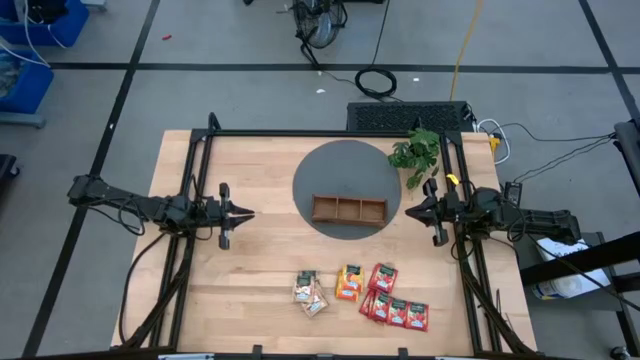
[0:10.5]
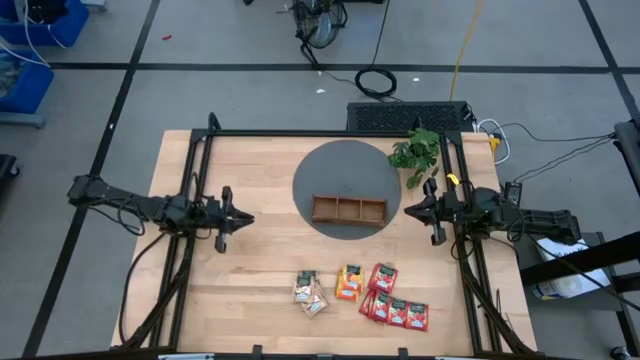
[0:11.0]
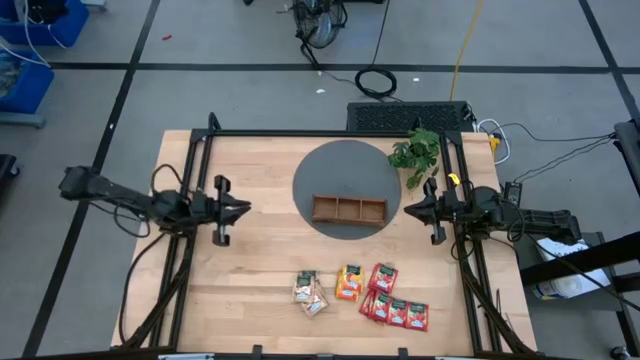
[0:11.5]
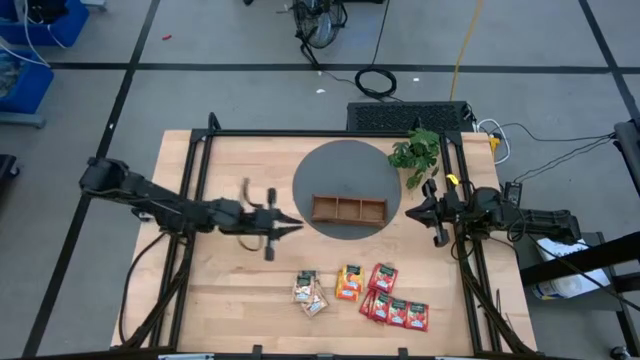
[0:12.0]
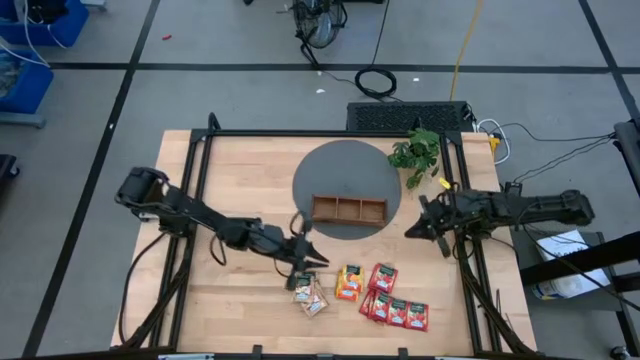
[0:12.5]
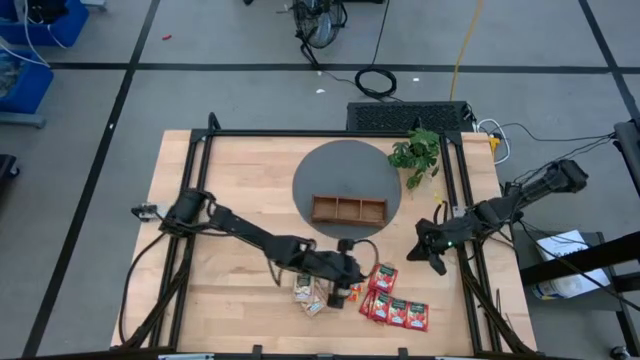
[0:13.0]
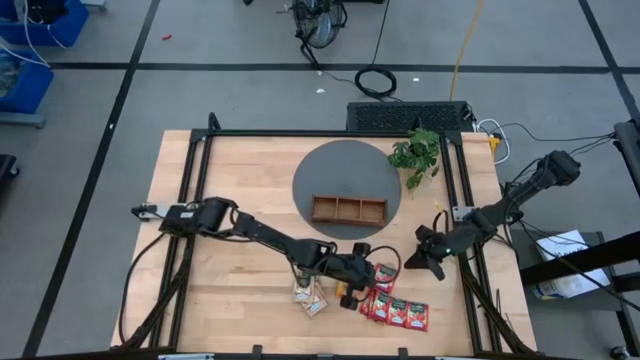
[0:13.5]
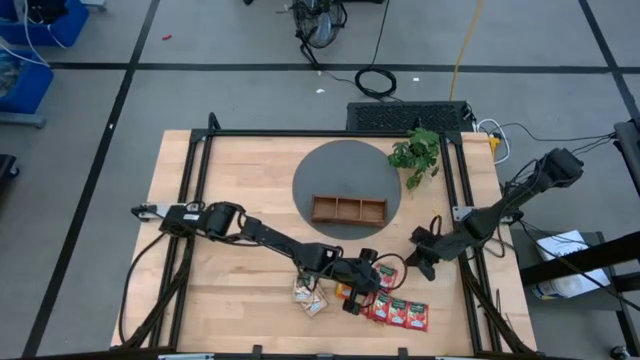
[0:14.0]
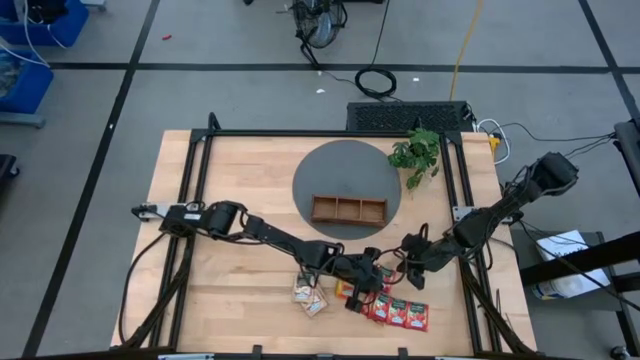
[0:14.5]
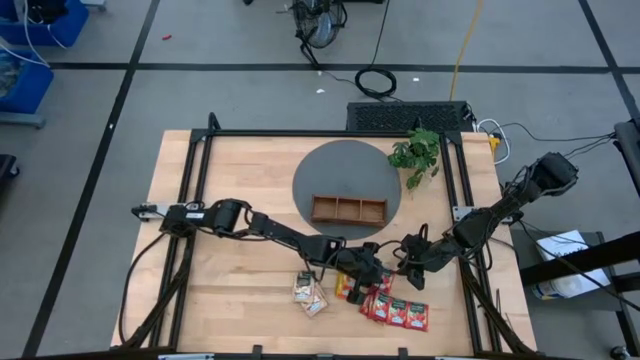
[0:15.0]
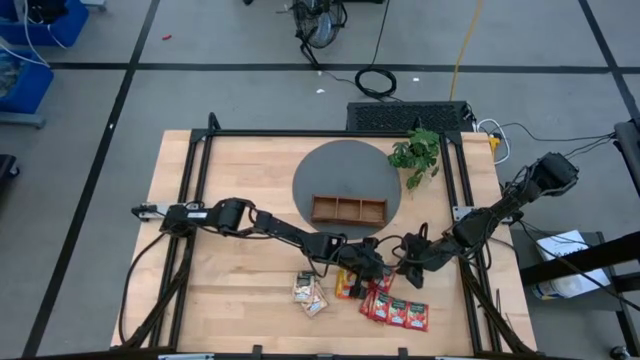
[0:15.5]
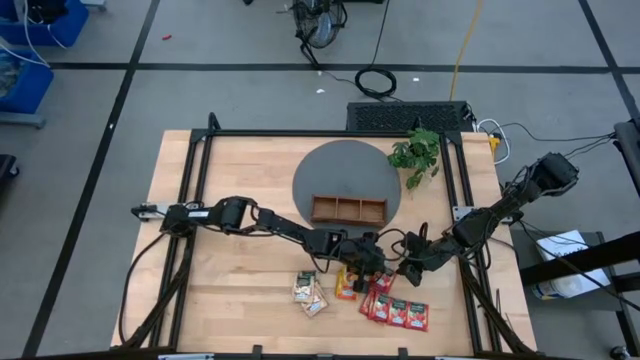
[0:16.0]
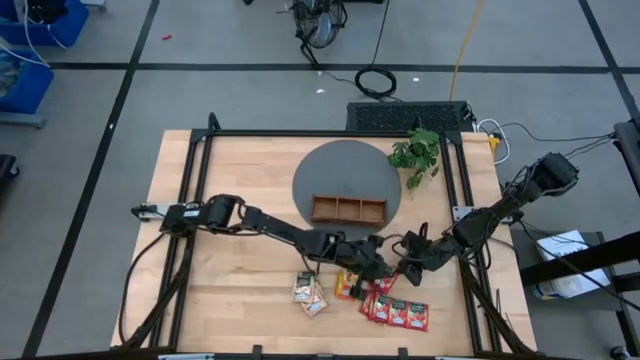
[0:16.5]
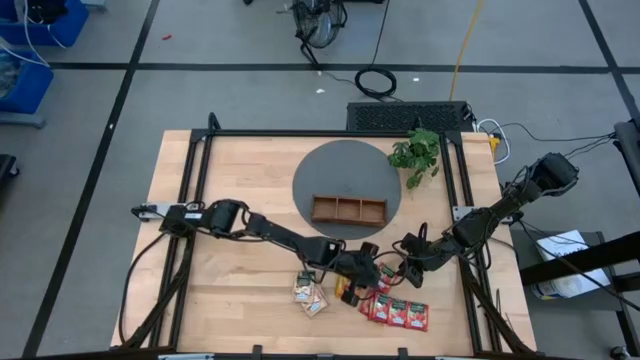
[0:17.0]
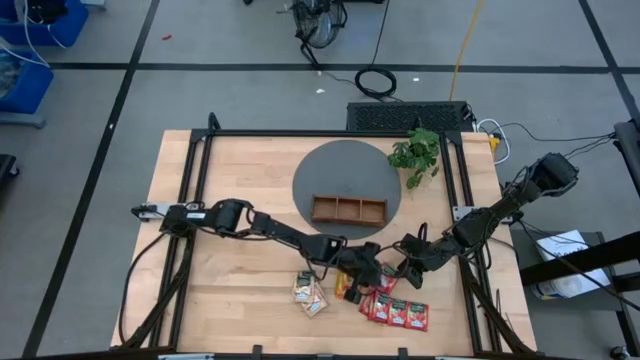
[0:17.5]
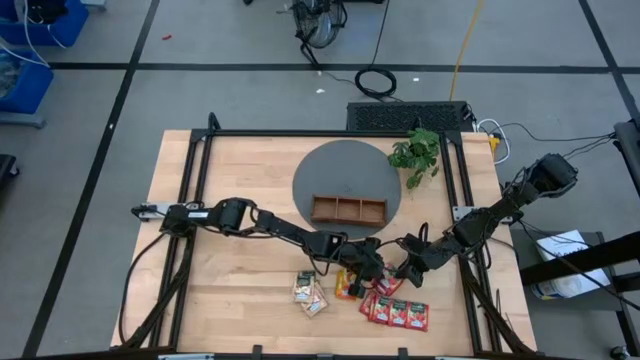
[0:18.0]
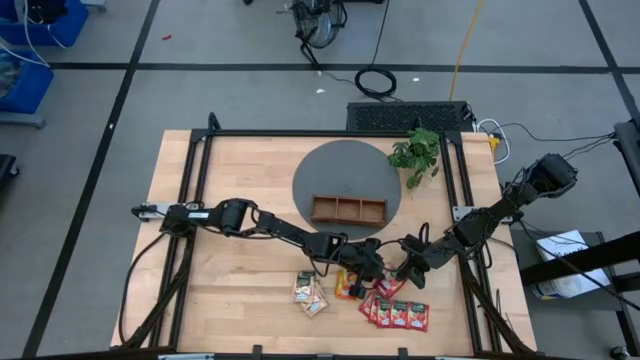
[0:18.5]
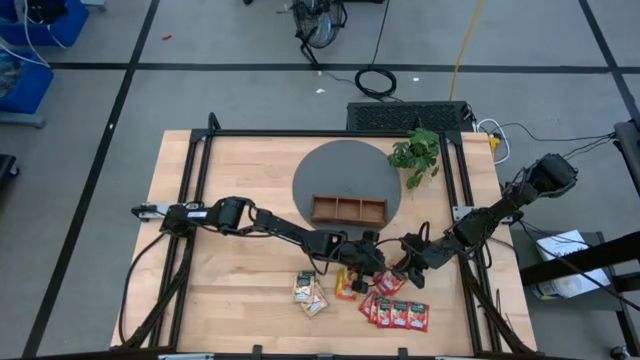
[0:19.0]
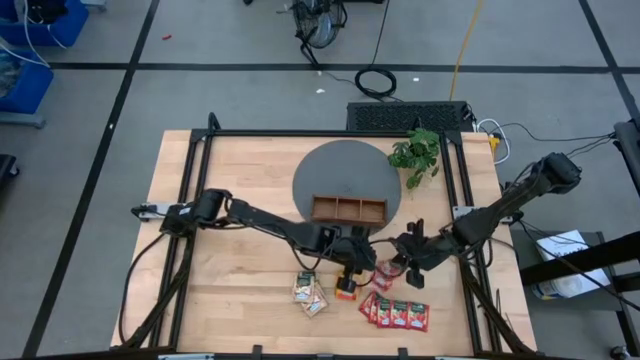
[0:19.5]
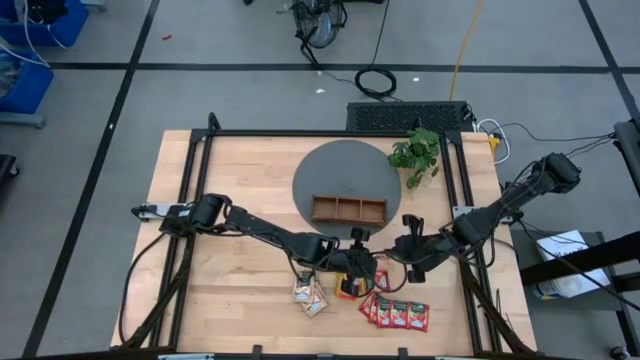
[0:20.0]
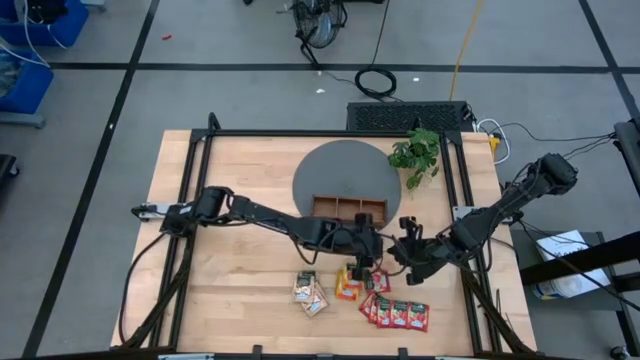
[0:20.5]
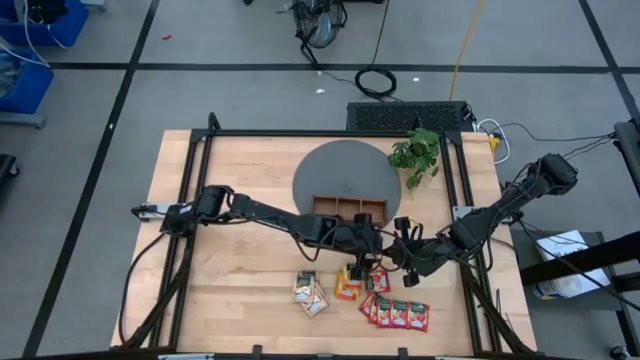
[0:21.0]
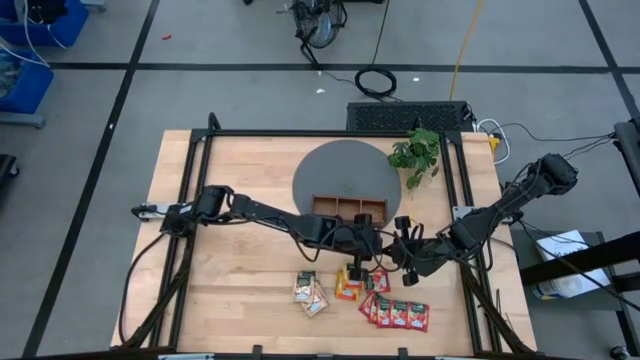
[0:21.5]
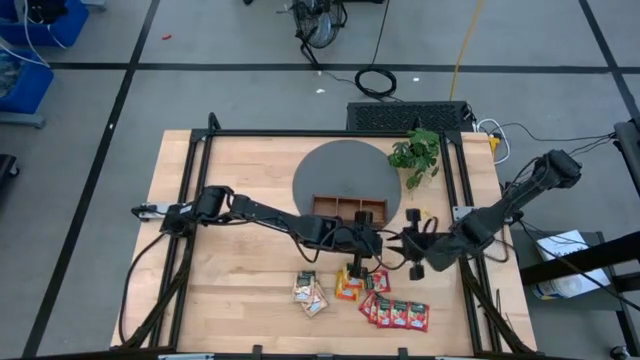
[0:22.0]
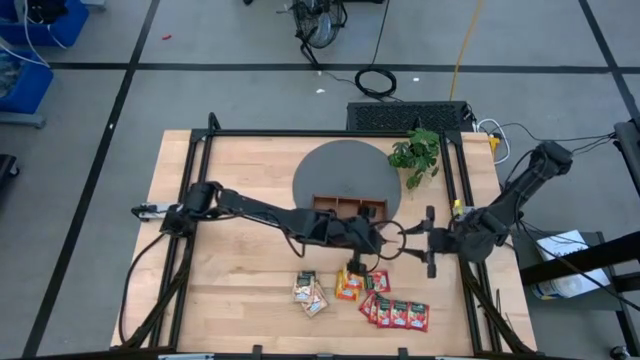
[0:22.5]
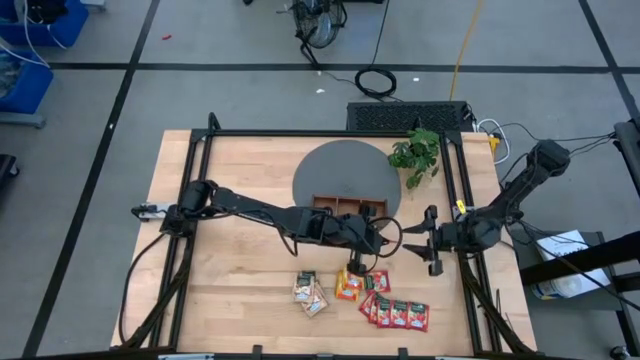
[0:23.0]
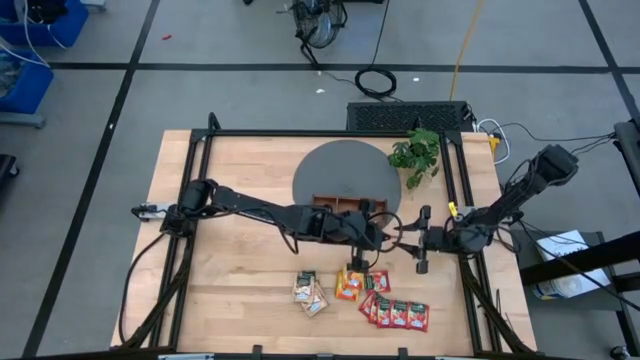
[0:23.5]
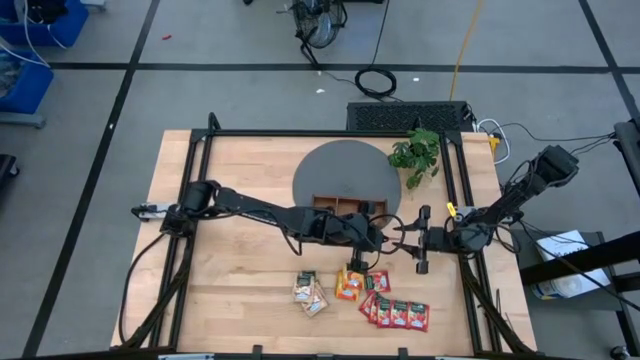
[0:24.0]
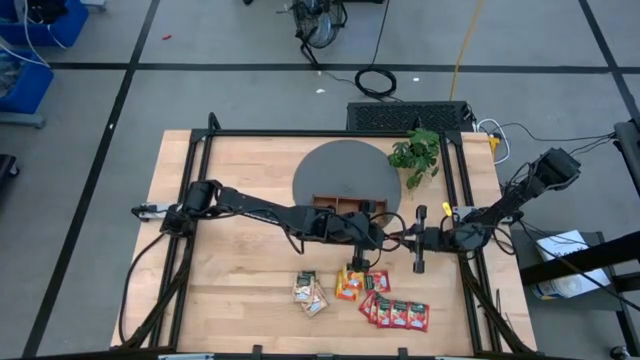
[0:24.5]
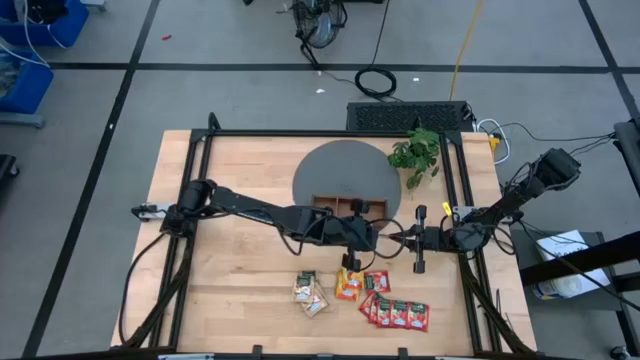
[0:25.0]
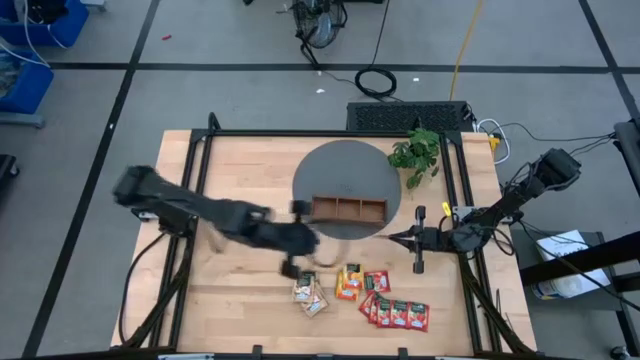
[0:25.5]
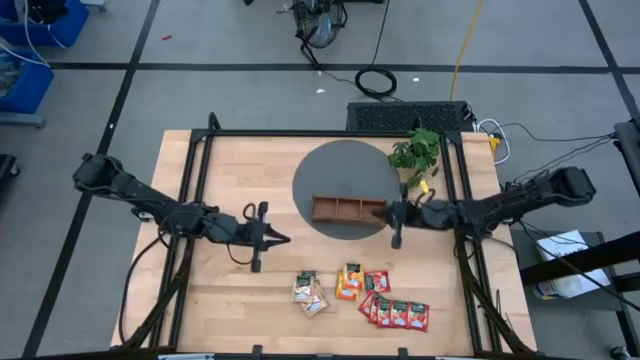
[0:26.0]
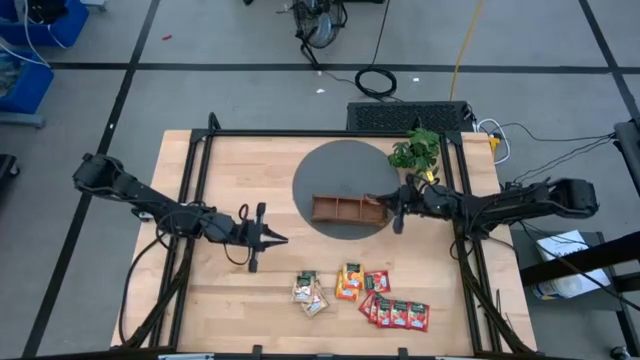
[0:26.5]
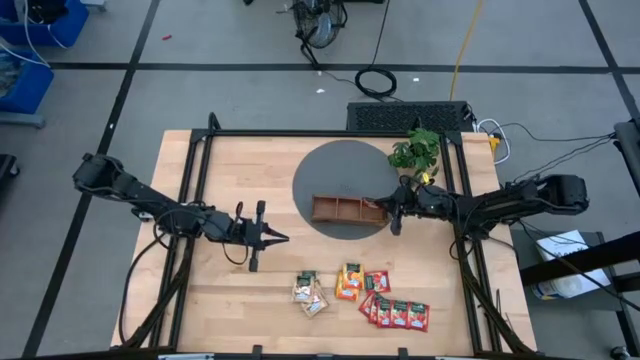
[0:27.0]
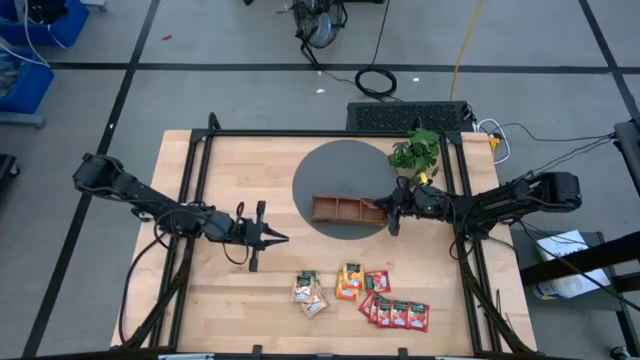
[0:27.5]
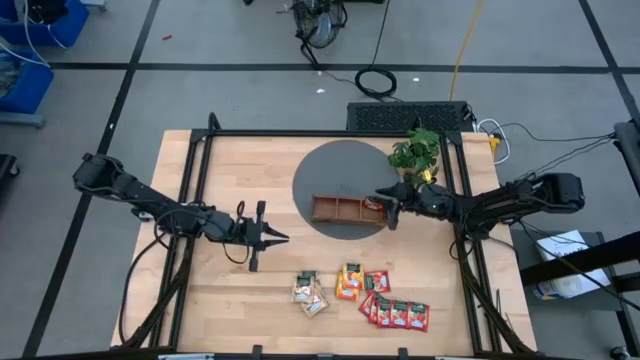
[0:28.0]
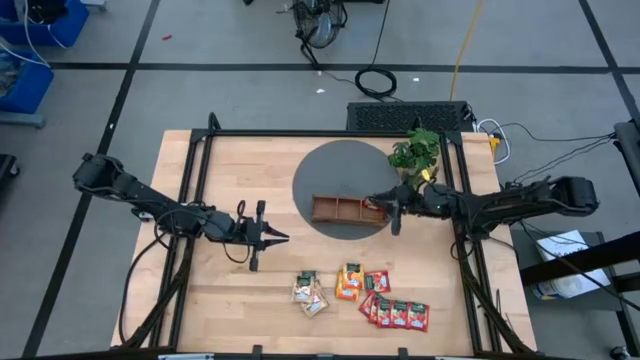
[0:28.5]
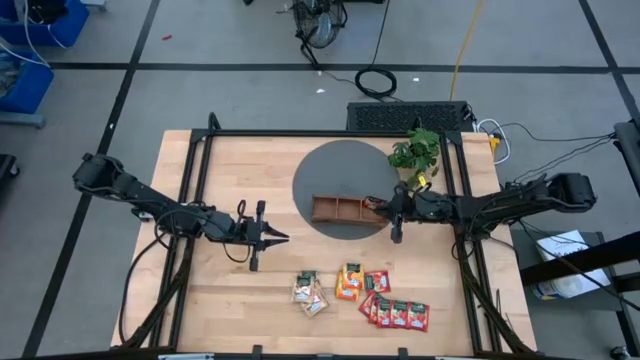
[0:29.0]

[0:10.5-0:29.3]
Task: Pick & Place Tea
Put the red tea bag into the left section of the wooden organiser

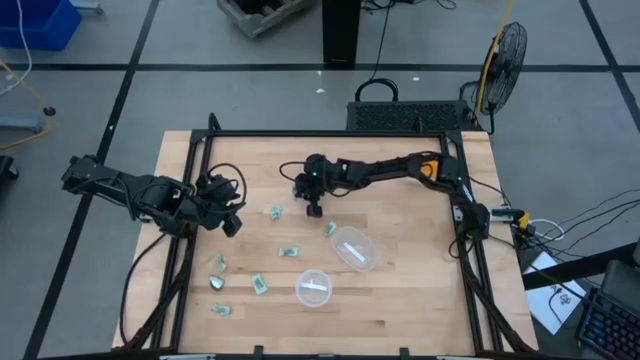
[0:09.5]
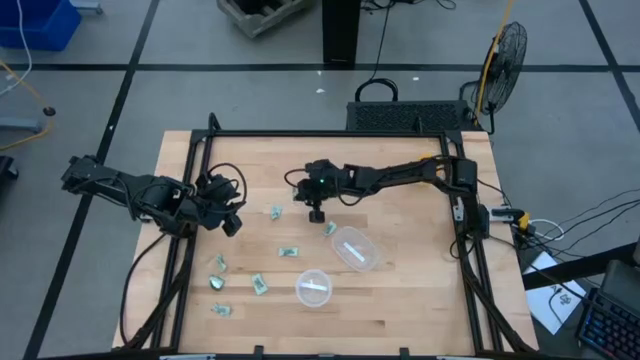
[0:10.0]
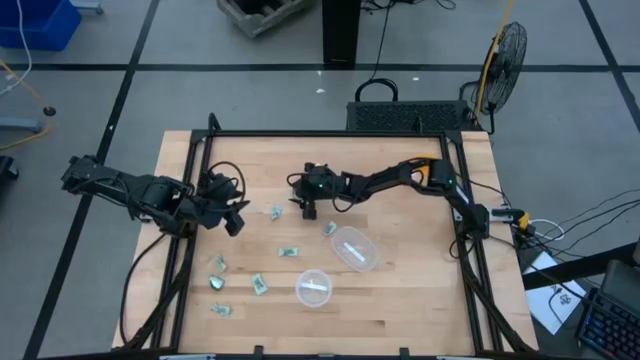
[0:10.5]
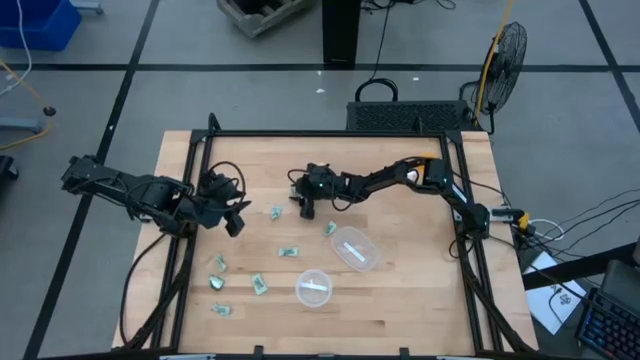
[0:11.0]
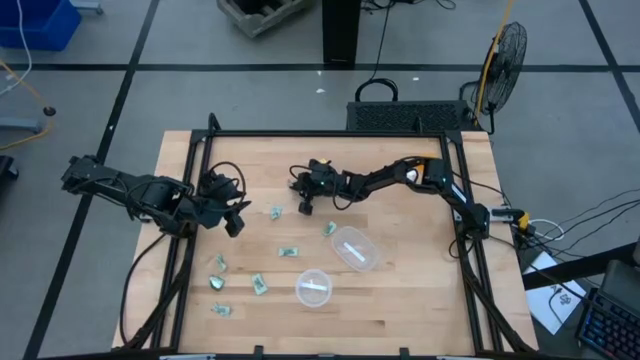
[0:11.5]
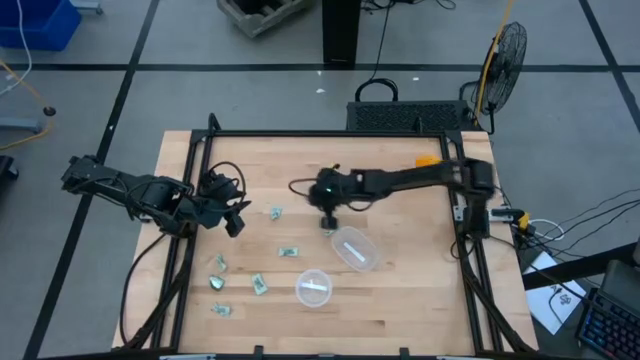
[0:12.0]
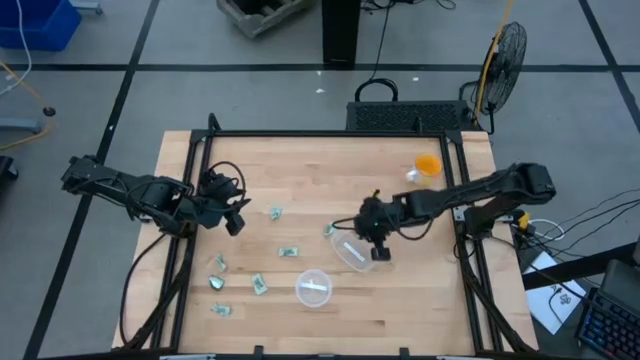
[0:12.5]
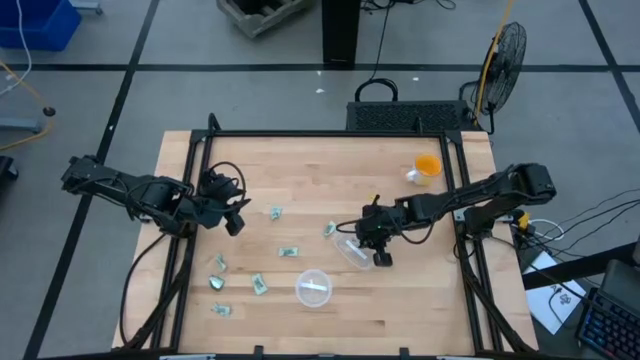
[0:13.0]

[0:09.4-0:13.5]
Task: Pick and place items into bin
Put the Stevia packet into the right transparent bin
